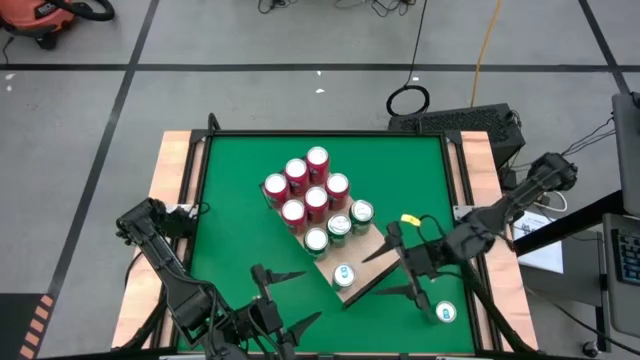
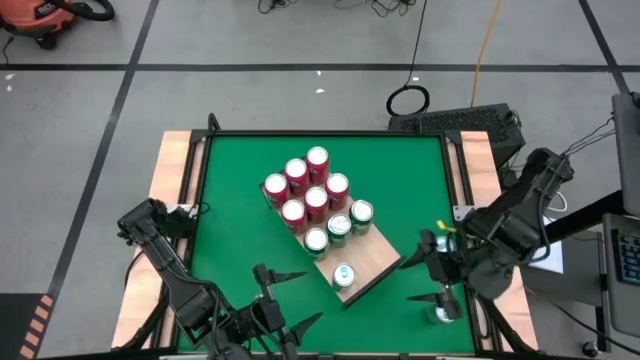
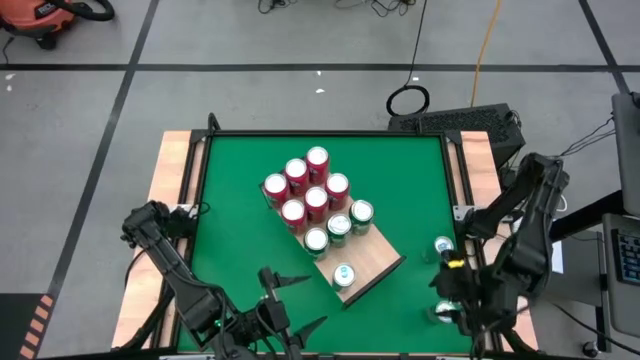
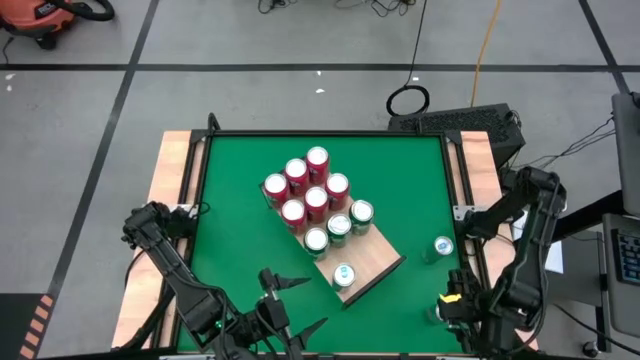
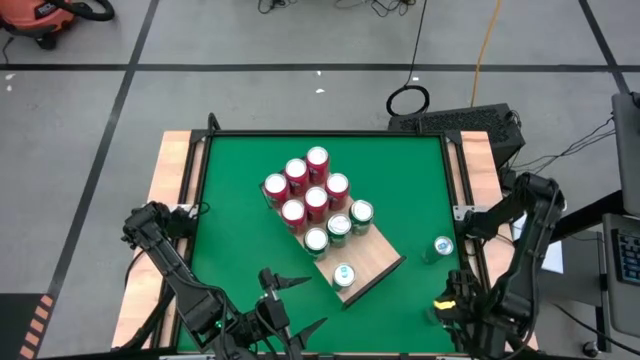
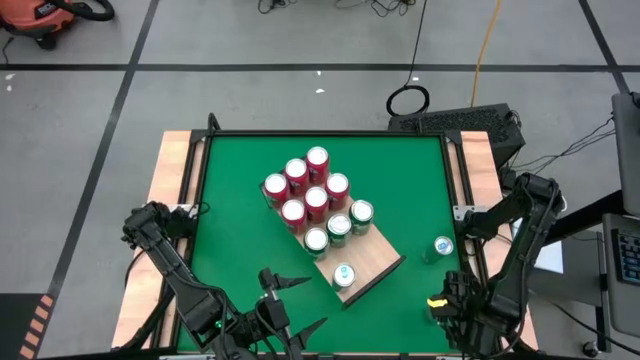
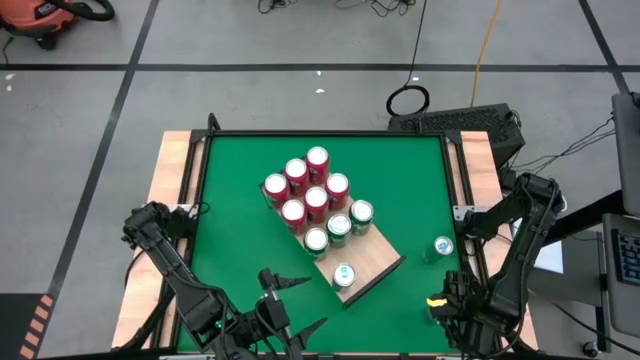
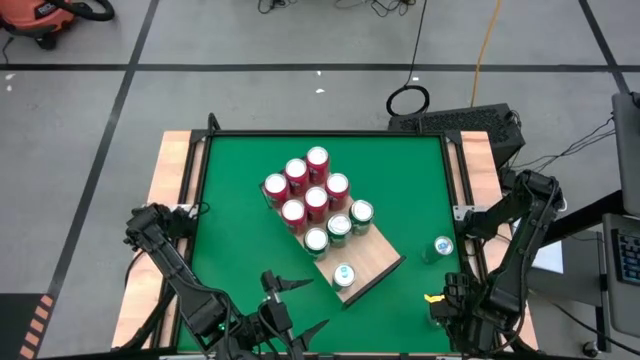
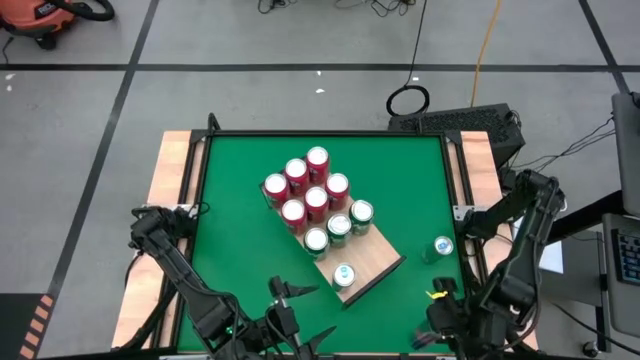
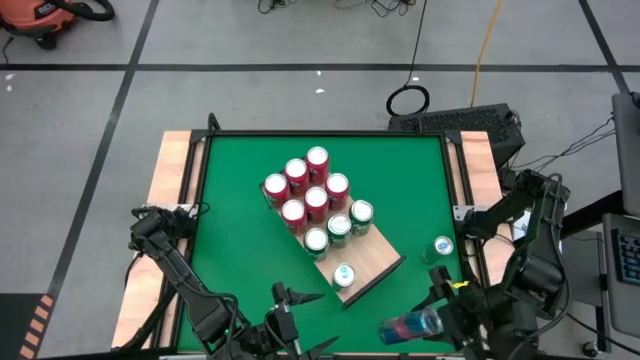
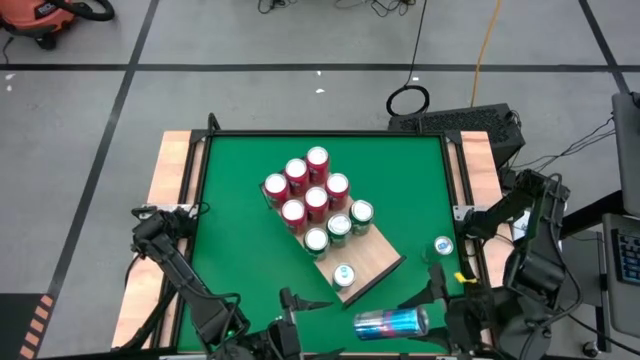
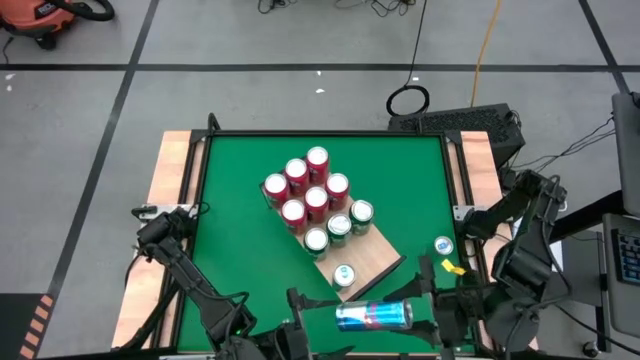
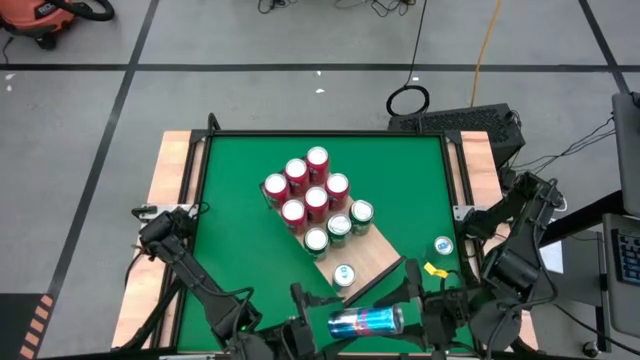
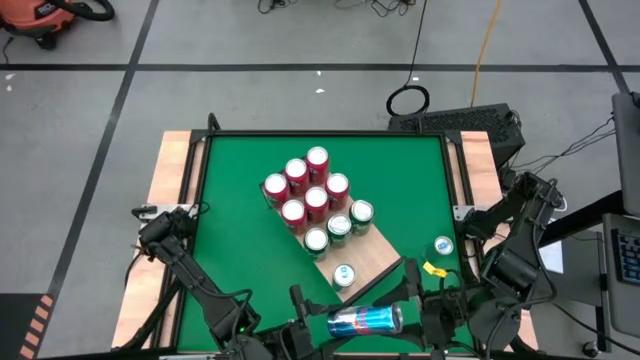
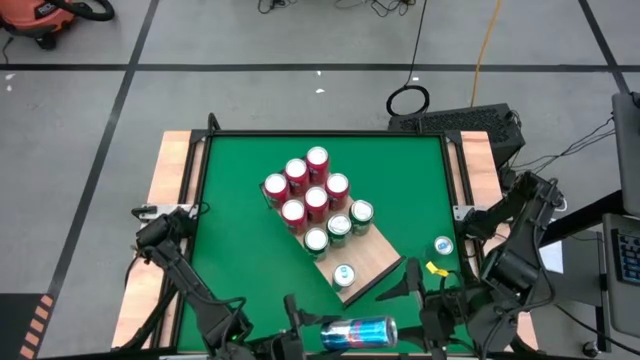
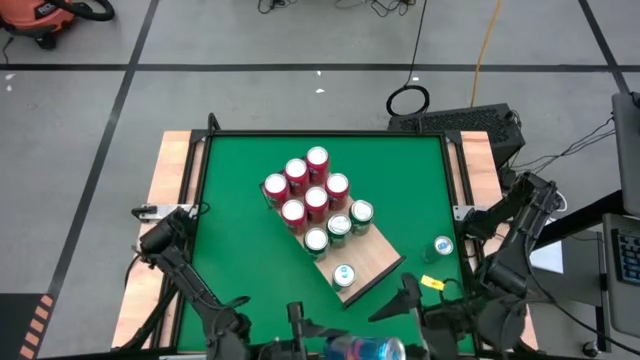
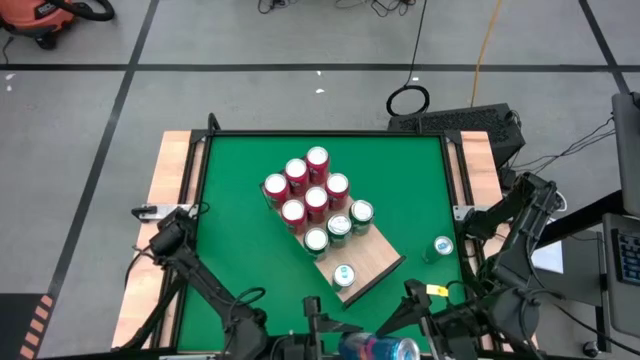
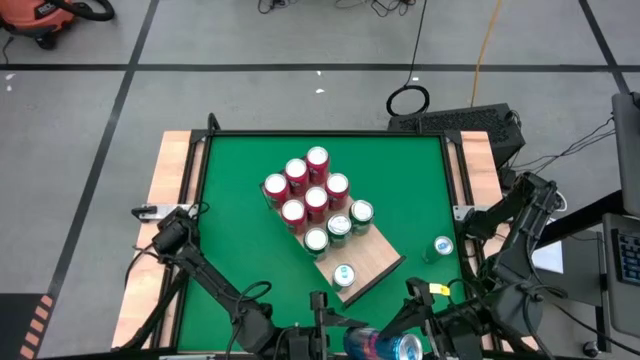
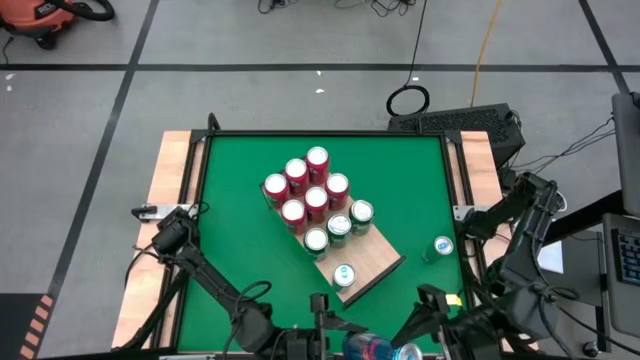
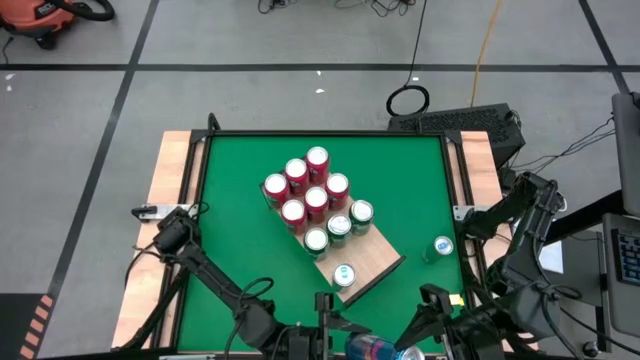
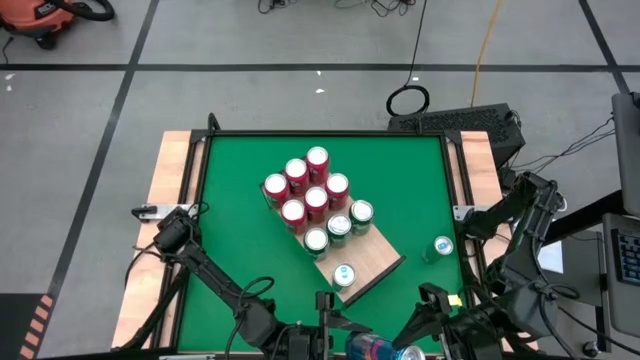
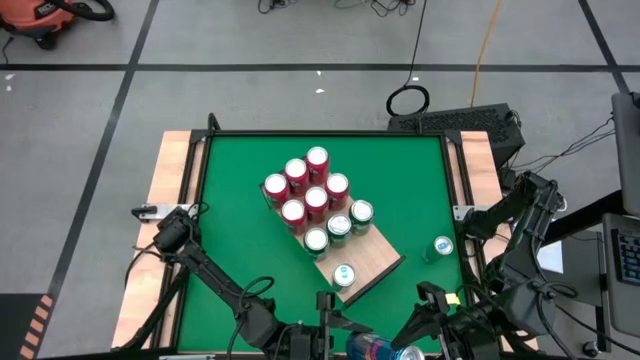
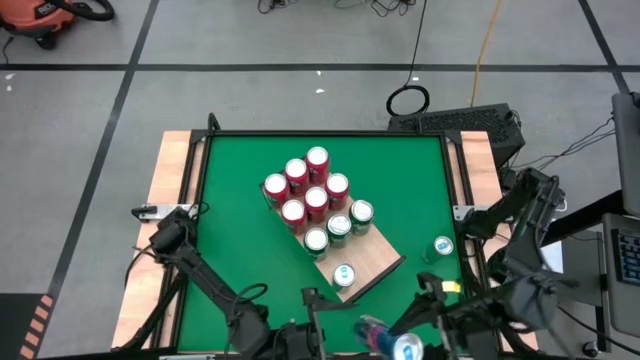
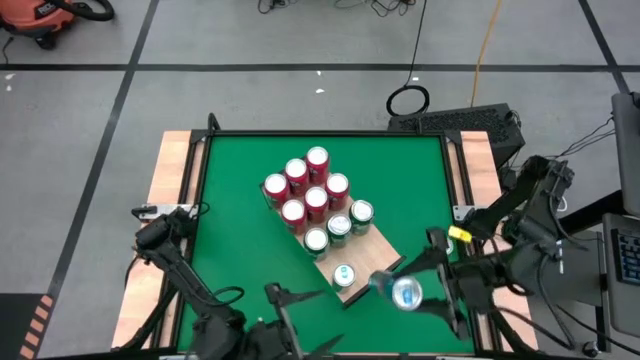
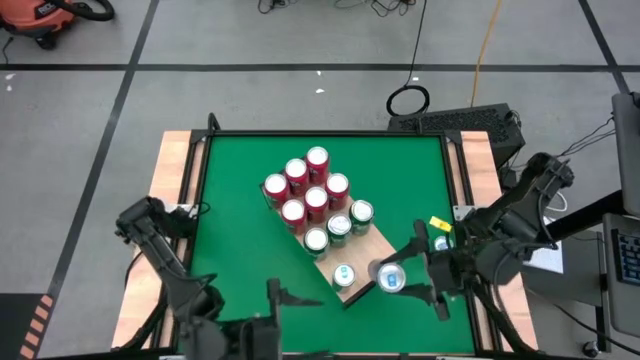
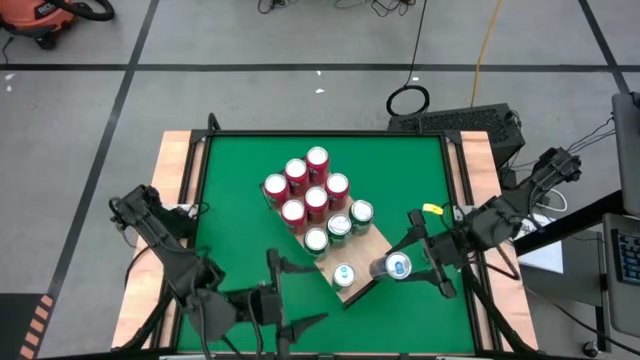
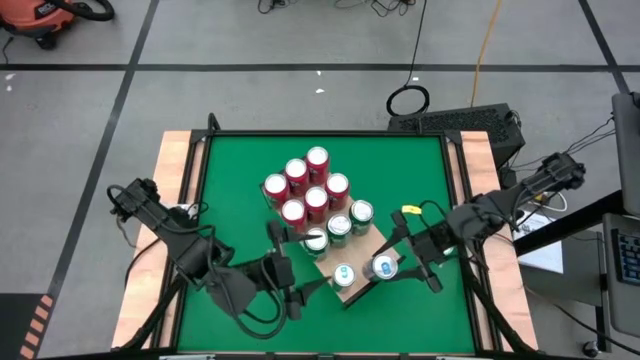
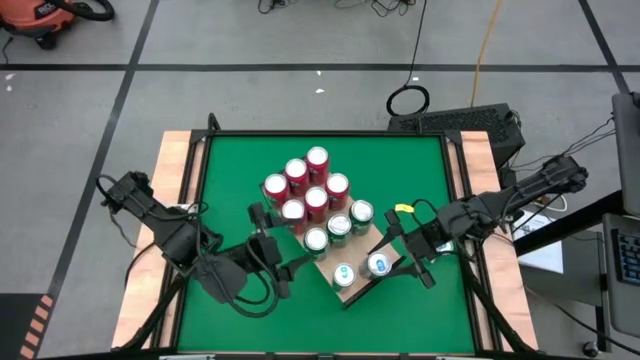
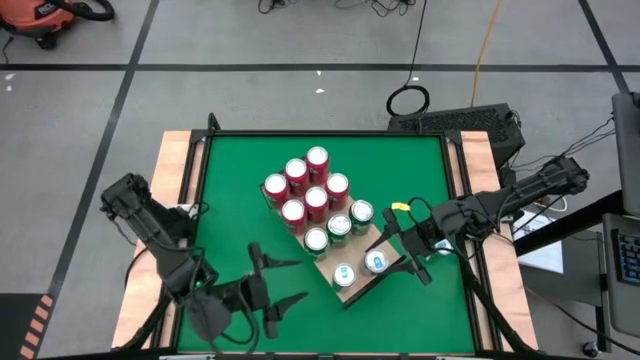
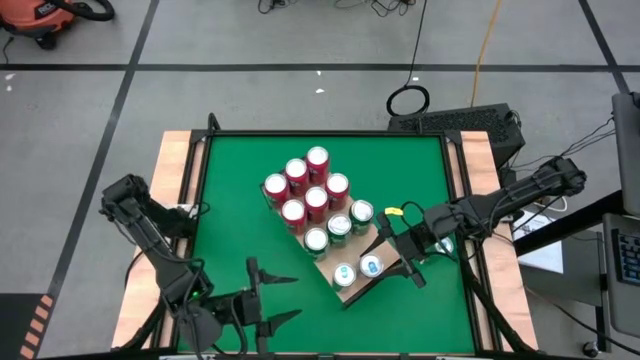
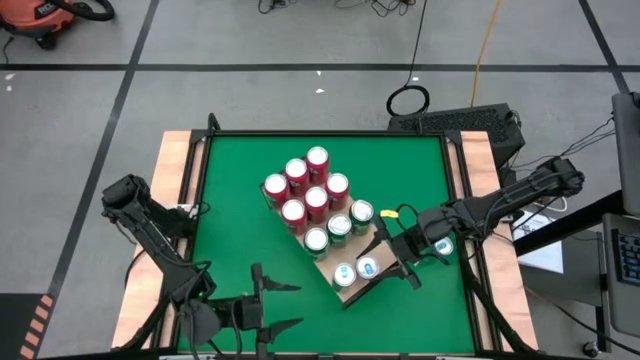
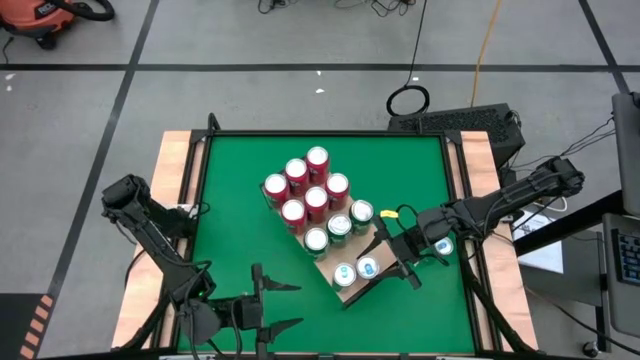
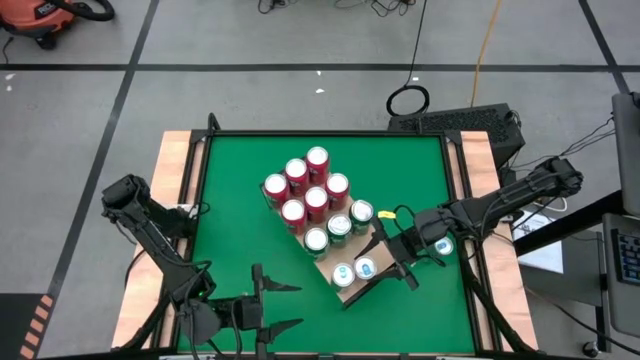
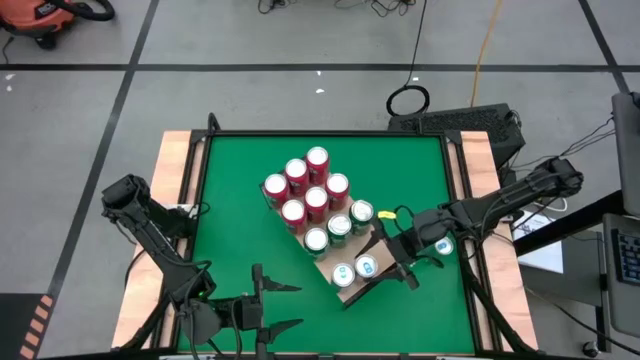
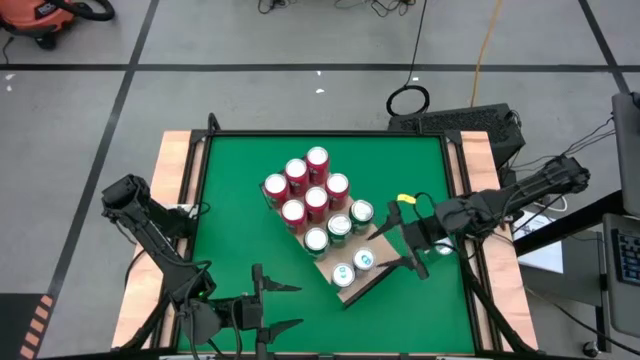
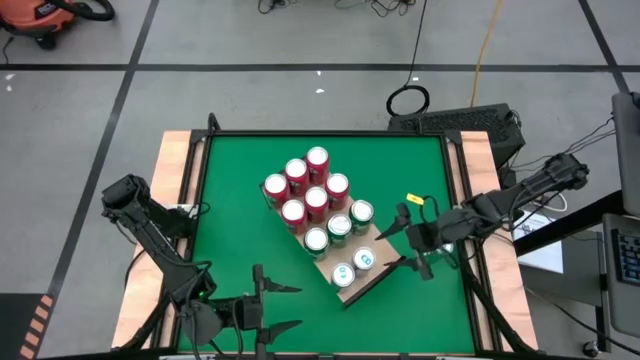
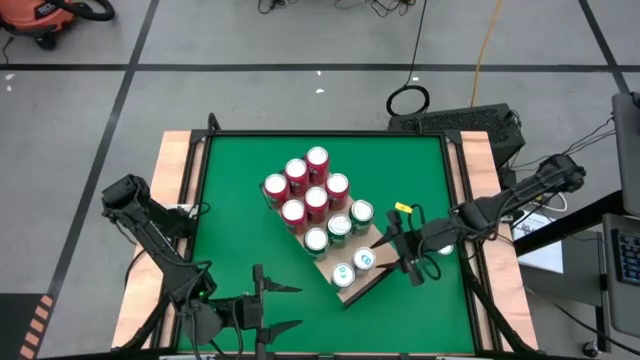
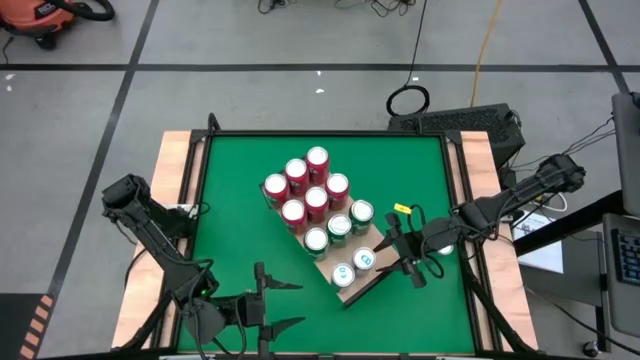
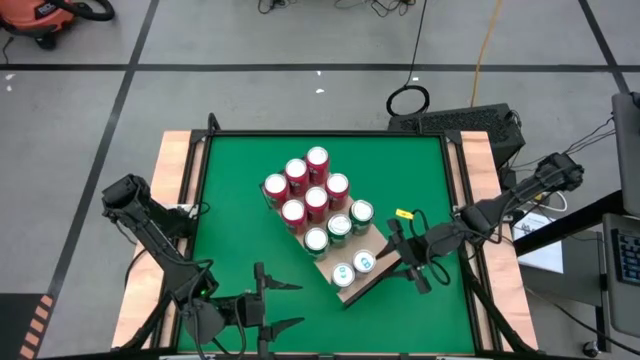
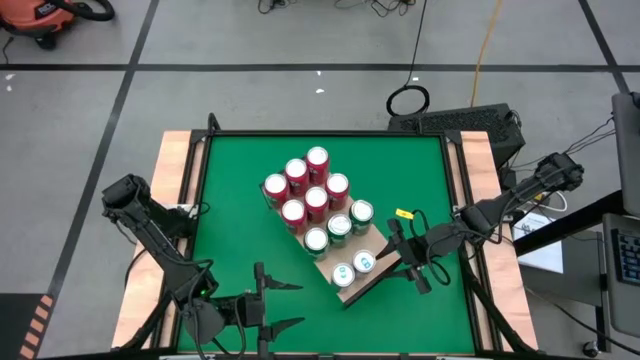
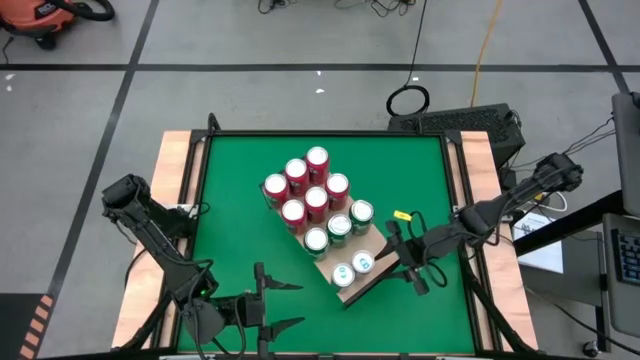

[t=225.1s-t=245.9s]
Task: Place canned beverage on shelf
Put the blue soda can on the shelf aligned with the other blue soda can

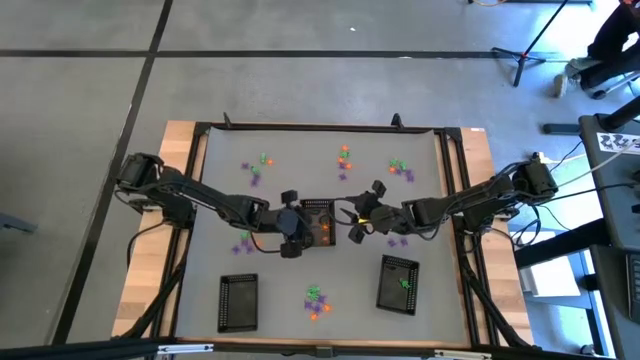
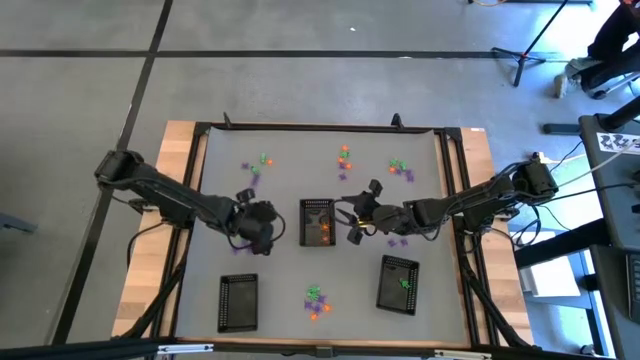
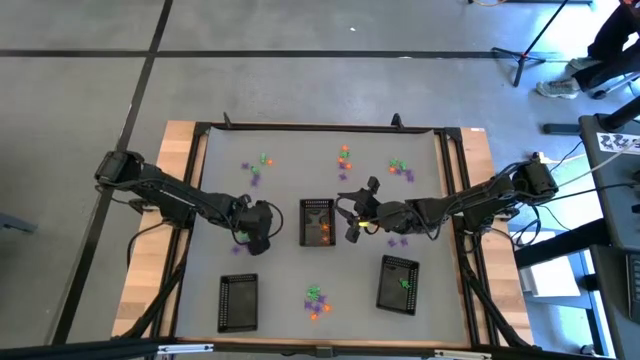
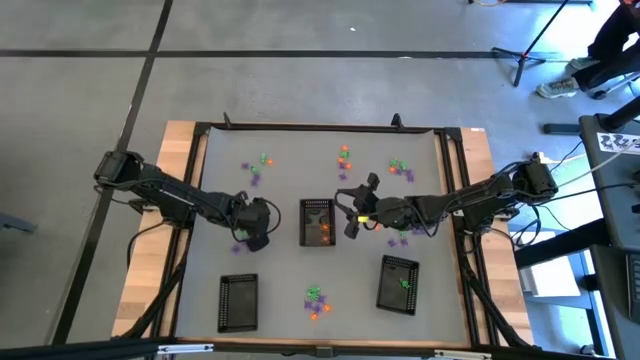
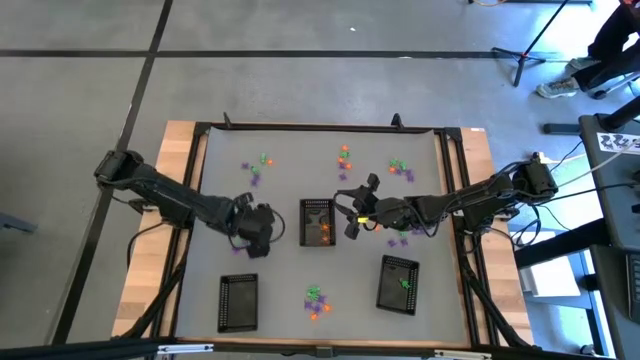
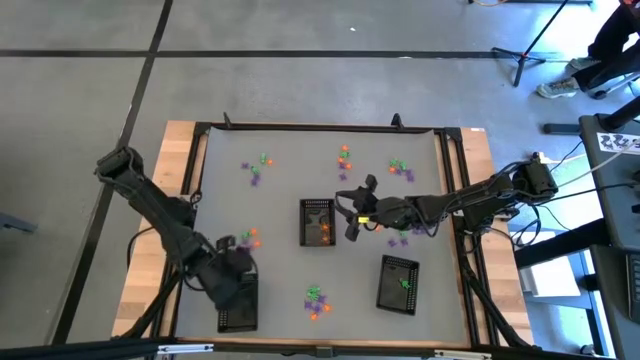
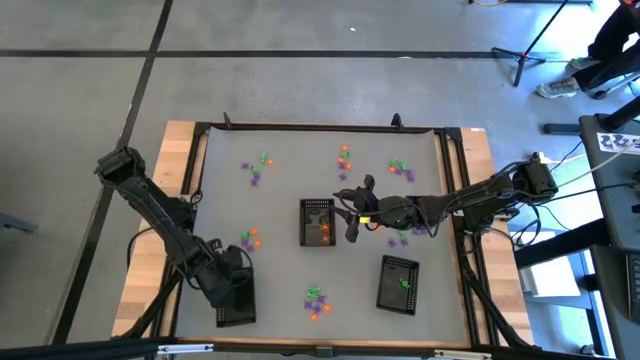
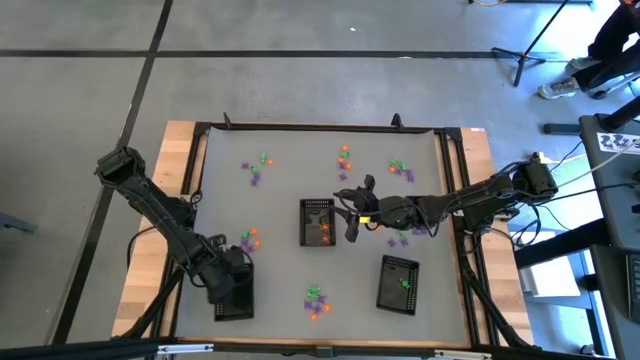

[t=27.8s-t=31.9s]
Task: Sort Halloween decoration
Put the violet spider toy into the bottom left black bin
